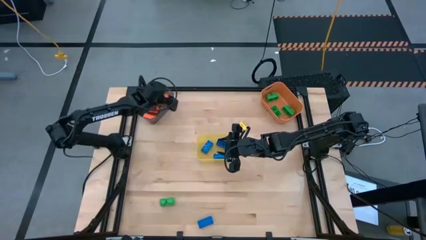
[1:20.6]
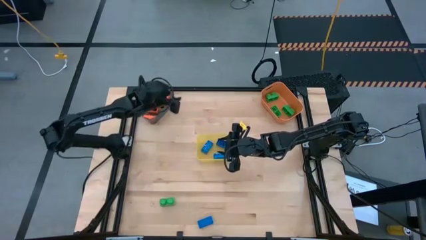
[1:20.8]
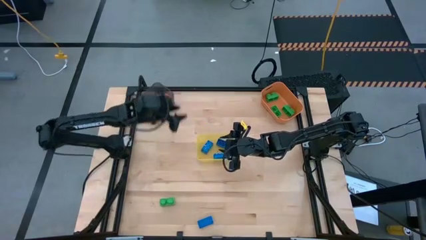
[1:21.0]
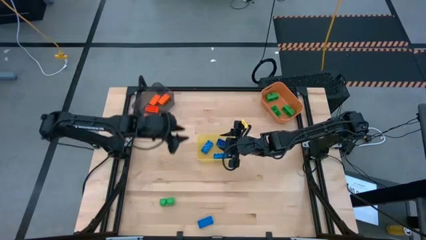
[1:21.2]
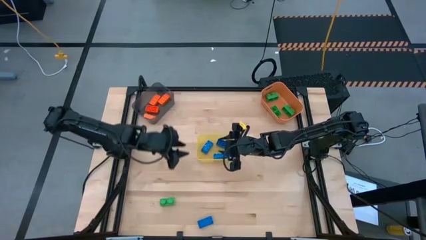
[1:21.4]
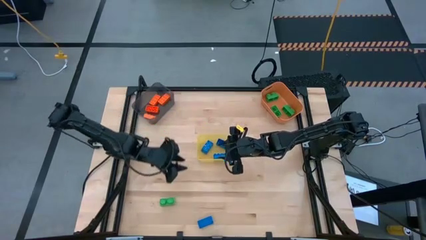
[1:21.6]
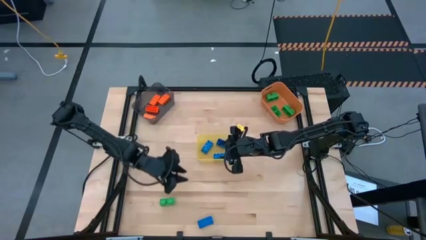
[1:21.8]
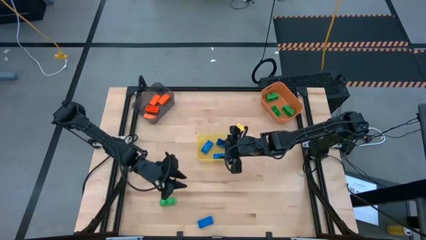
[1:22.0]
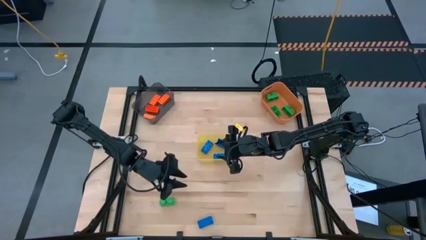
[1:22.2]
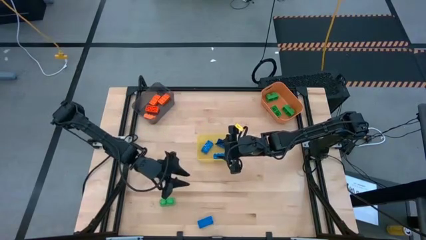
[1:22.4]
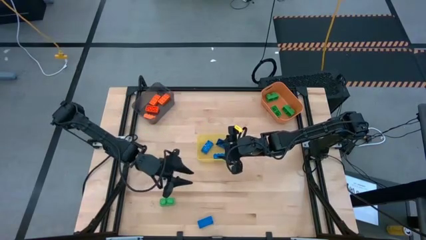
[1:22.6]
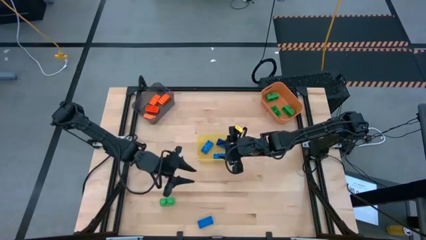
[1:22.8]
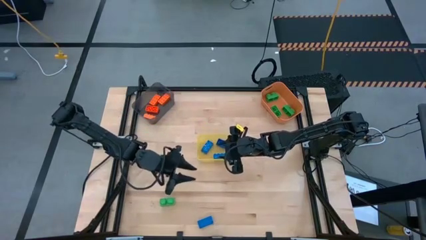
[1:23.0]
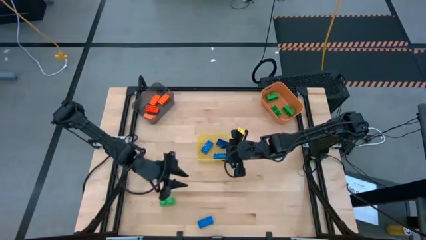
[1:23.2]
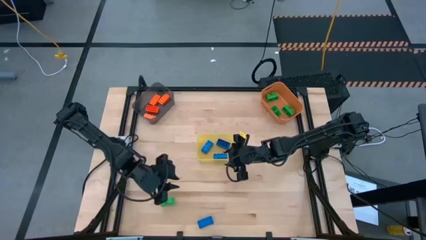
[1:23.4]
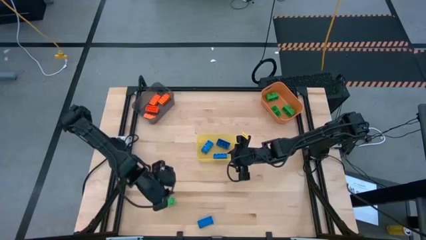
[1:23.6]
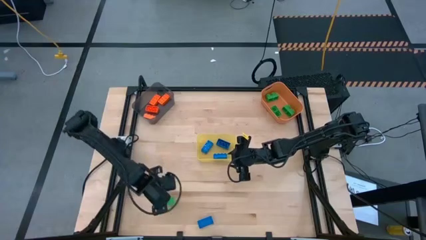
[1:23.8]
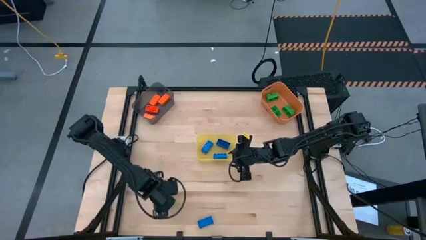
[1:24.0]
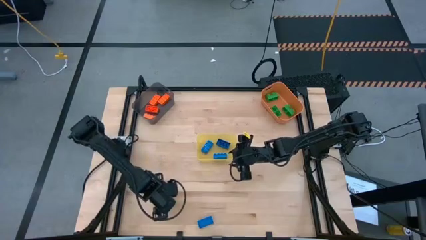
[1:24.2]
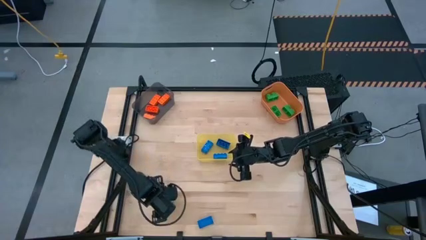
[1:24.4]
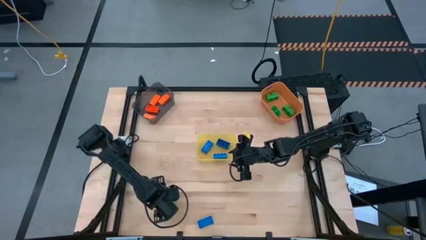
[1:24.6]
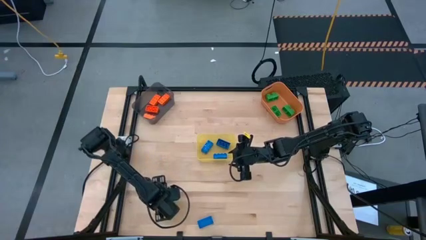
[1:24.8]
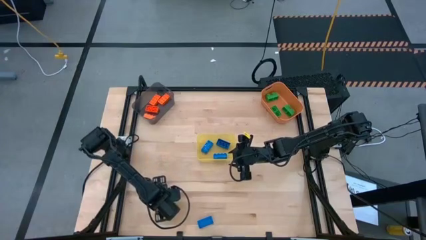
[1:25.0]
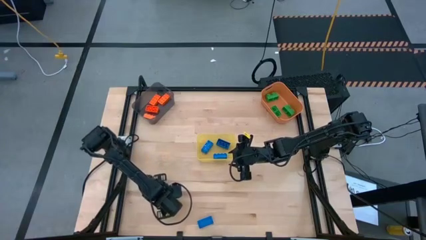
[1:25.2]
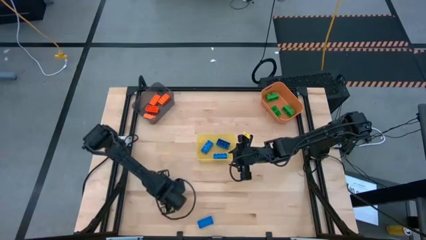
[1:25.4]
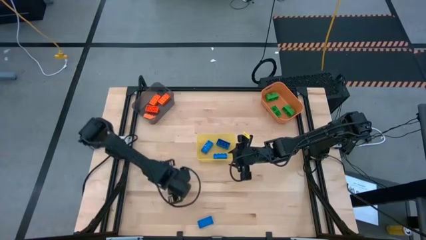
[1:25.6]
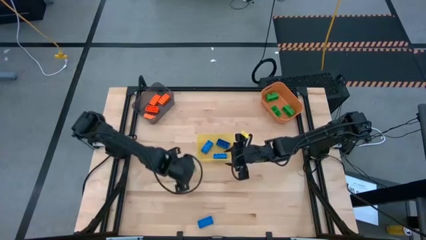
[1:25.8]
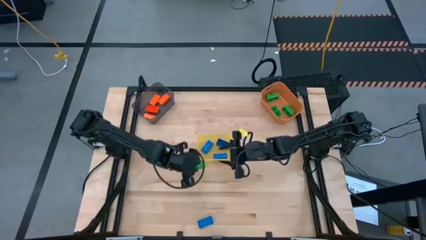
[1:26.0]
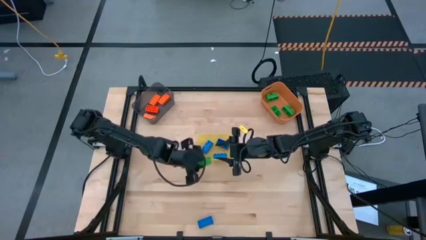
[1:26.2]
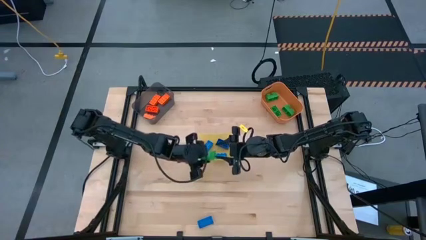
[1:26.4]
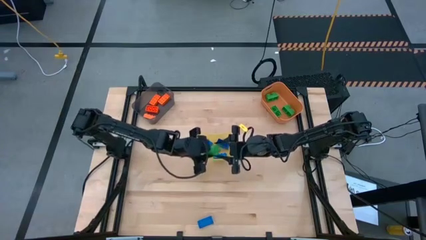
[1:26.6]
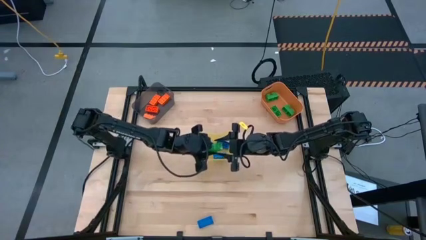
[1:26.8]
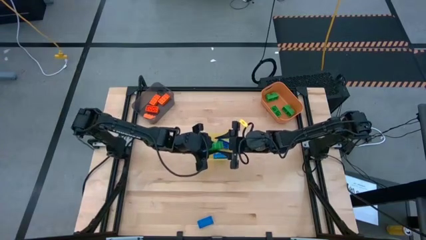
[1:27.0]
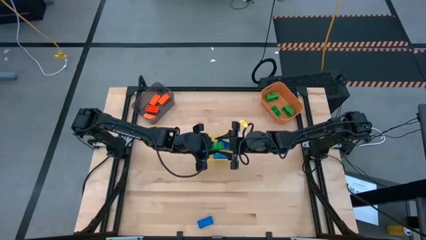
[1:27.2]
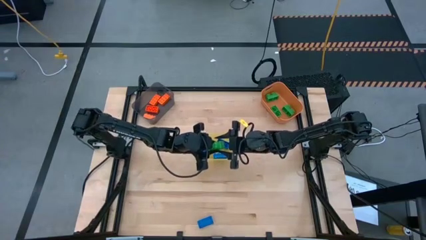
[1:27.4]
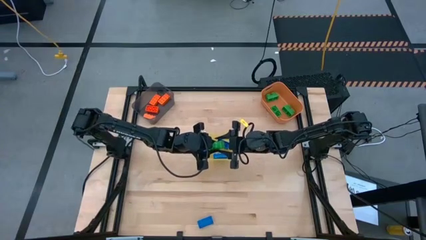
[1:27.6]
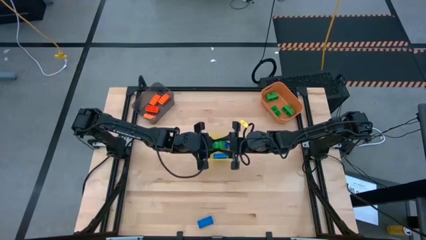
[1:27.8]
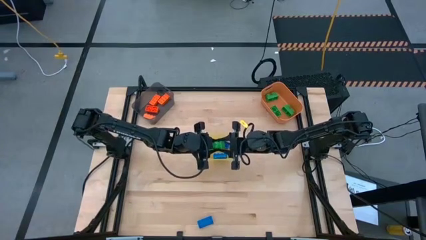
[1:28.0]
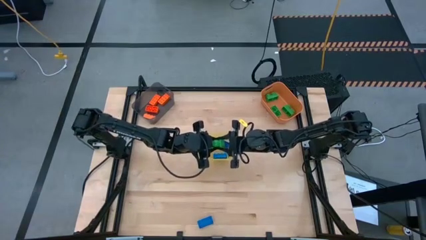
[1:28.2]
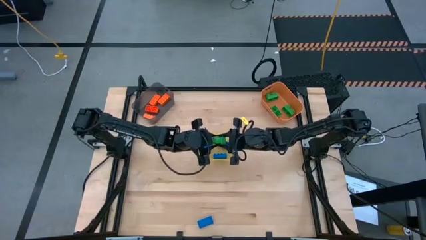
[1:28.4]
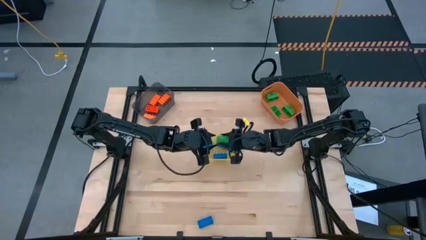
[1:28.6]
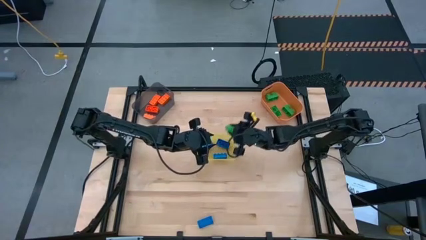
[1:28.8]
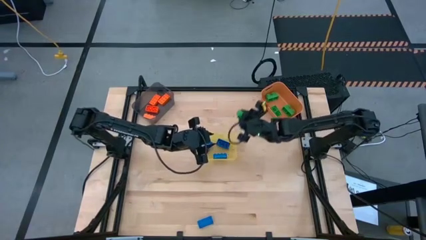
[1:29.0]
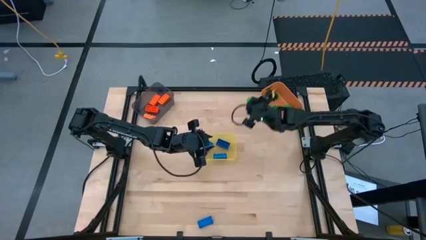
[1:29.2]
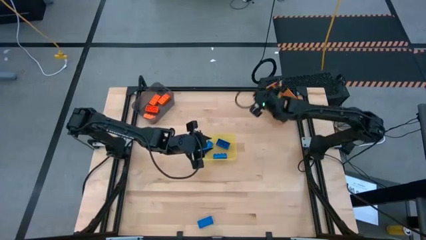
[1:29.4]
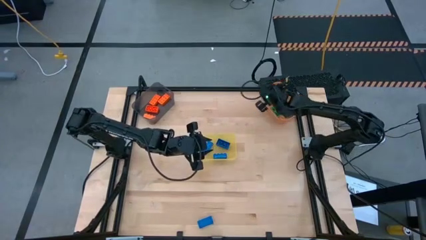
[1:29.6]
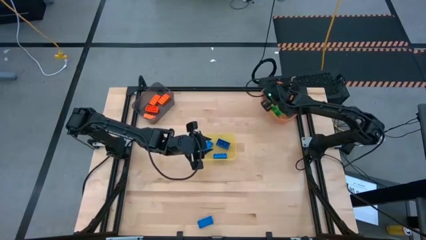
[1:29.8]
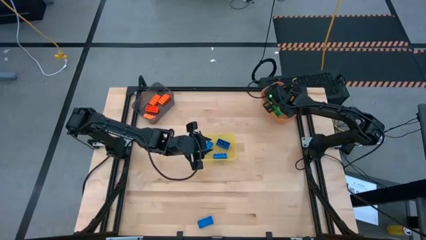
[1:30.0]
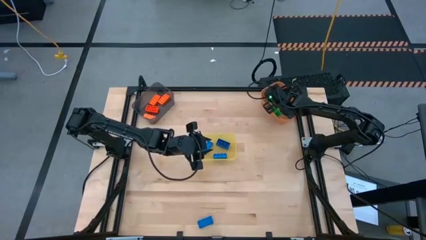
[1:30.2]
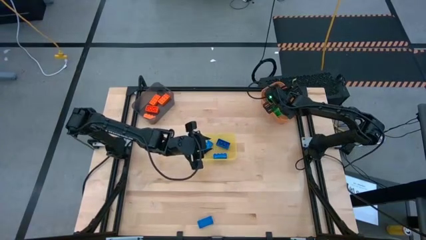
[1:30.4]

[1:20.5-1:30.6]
Task: Sort & place blocks by color
Put the green game piece into the orange bin

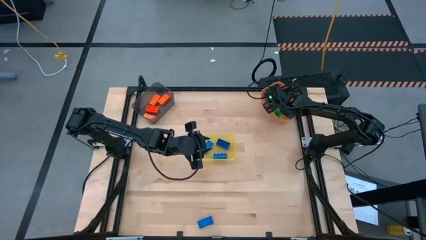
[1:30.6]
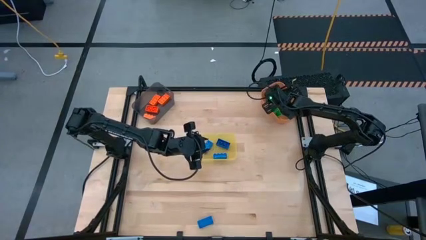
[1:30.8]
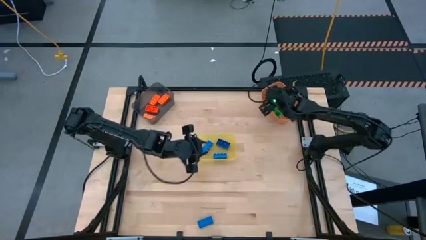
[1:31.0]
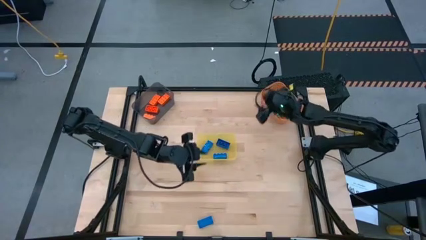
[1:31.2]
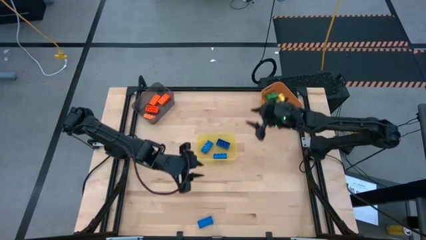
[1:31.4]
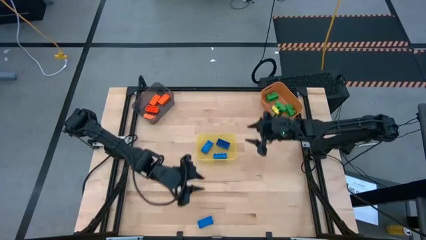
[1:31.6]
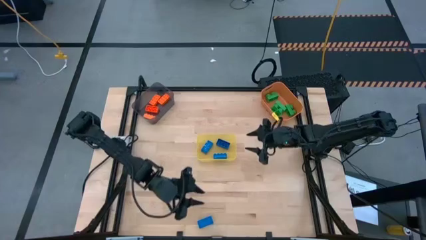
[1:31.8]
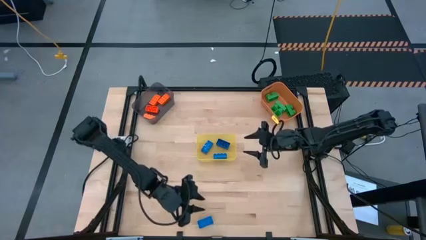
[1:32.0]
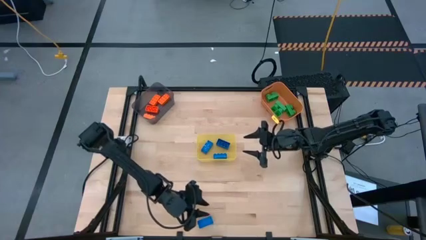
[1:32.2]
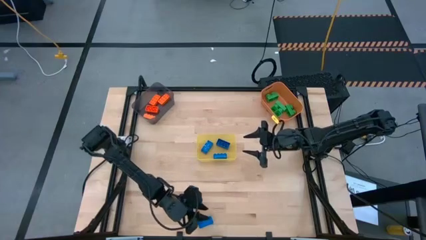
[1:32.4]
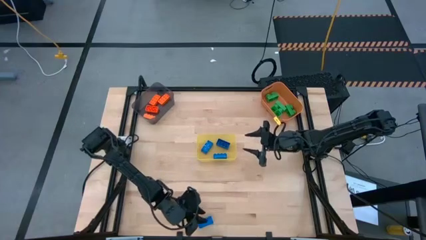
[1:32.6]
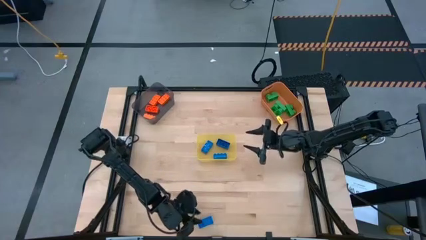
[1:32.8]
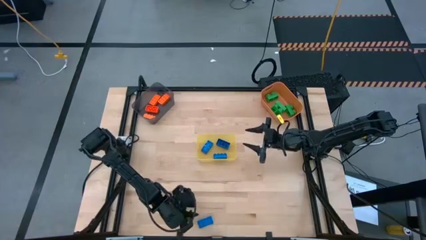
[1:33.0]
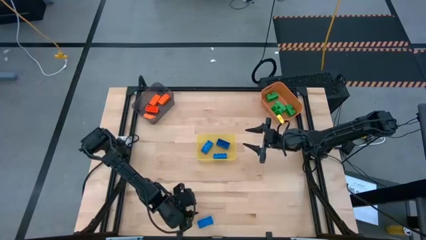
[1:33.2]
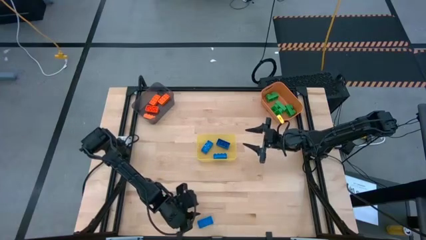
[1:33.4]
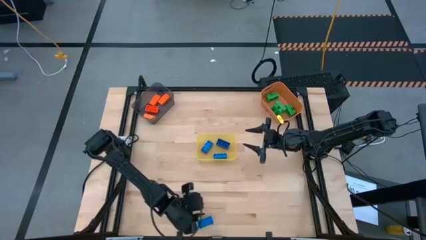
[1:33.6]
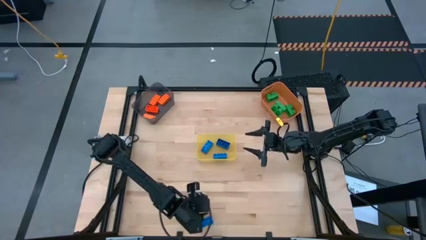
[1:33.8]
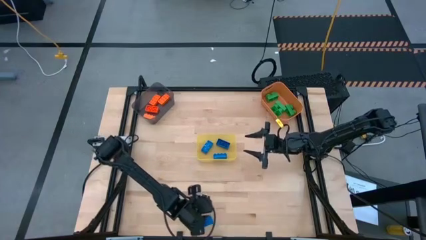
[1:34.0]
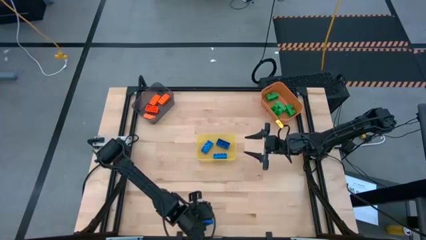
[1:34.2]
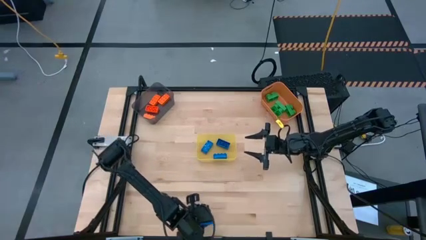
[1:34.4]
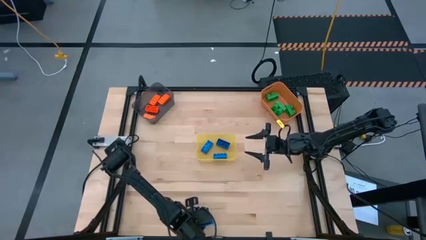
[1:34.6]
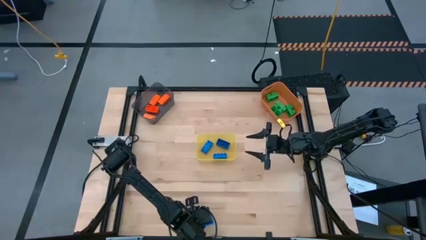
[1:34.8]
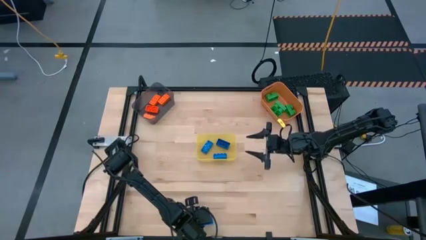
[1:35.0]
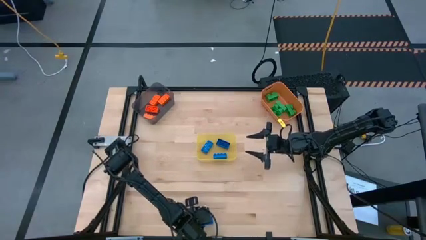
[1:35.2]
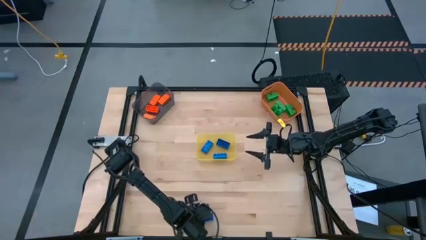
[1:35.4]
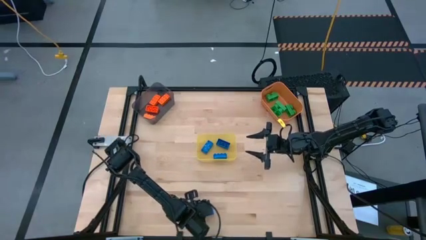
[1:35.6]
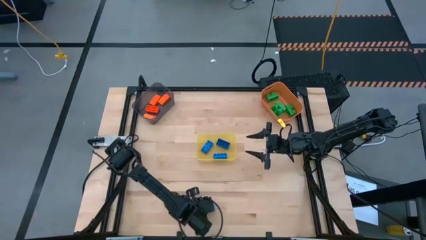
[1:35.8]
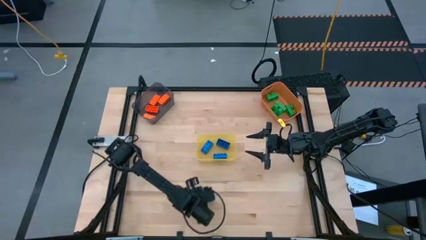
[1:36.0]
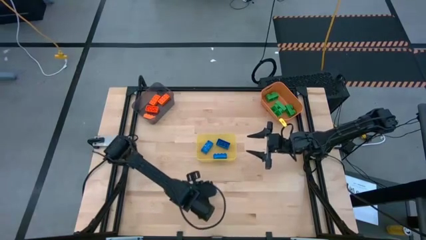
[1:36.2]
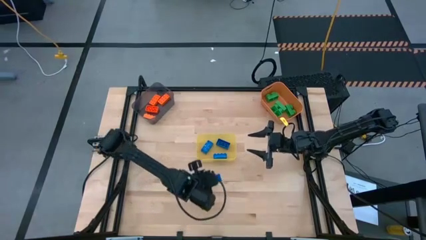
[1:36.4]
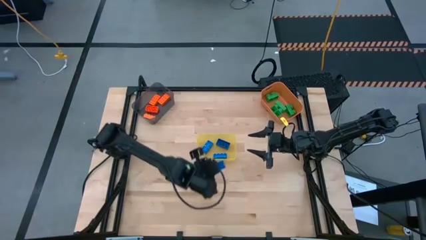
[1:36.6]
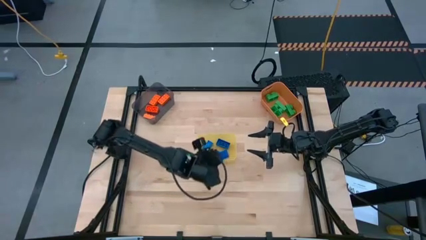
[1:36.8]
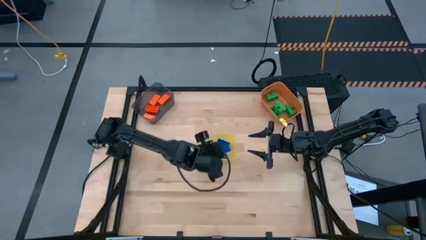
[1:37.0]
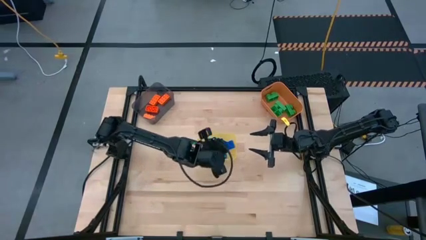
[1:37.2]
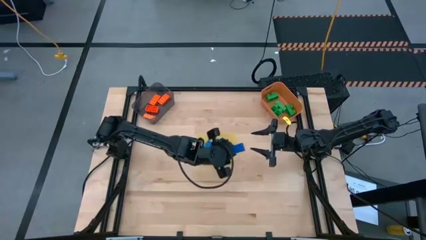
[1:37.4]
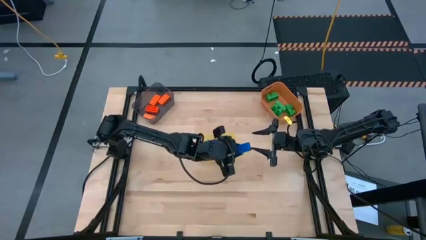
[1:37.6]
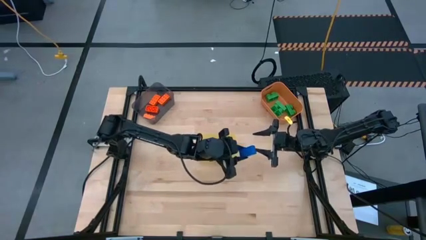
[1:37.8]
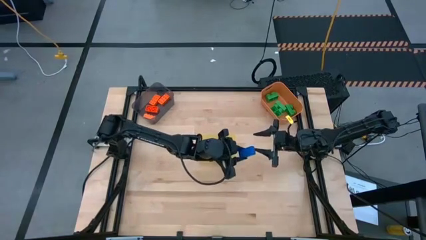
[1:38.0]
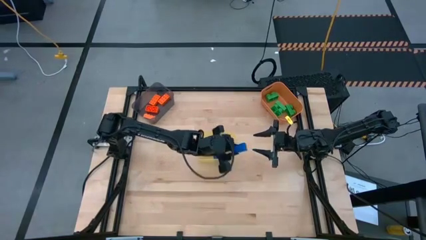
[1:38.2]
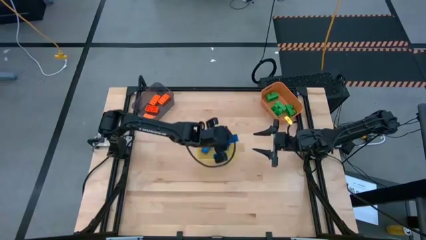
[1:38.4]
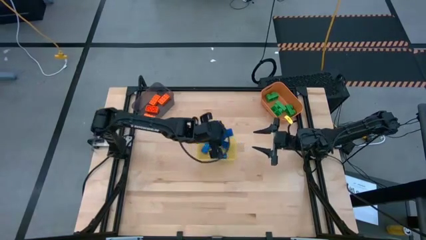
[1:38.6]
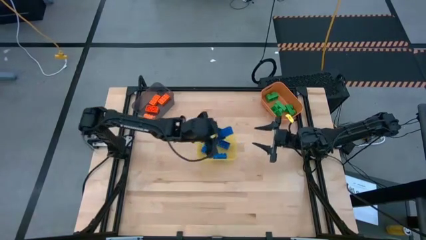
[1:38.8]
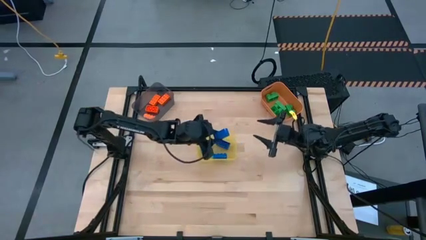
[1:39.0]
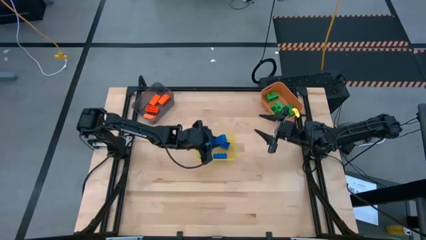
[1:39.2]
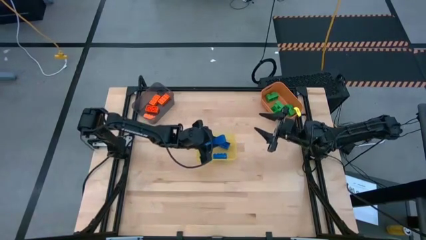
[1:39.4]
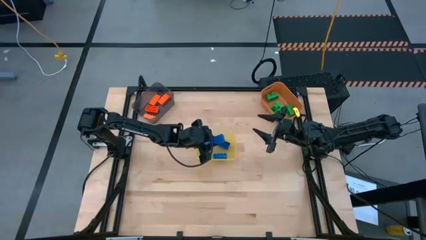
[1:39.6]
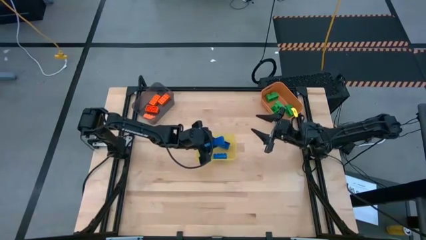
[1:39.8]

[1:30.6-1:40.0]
Put the blue game piece into the yellow bin
